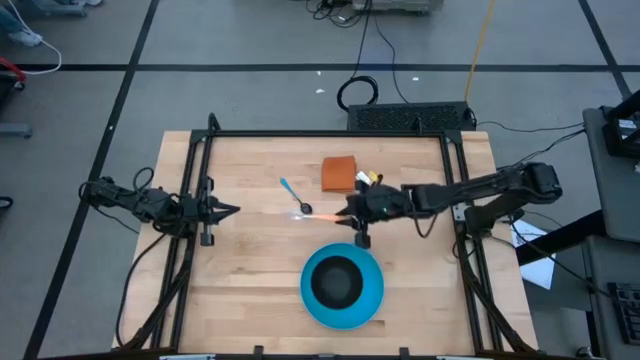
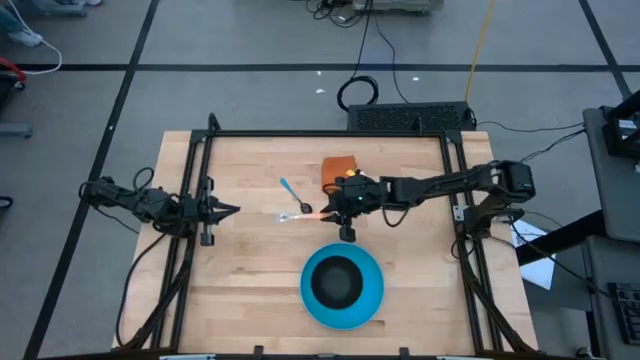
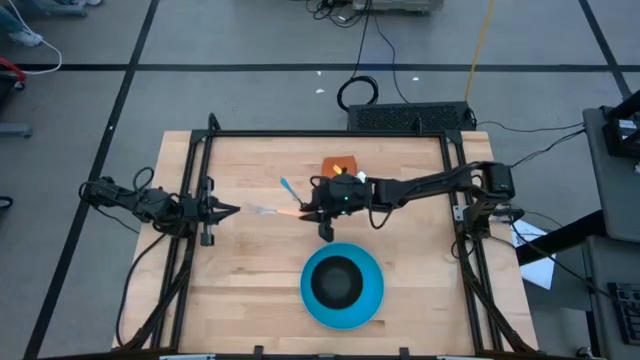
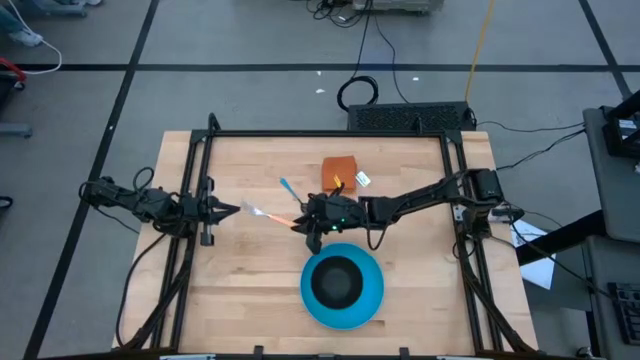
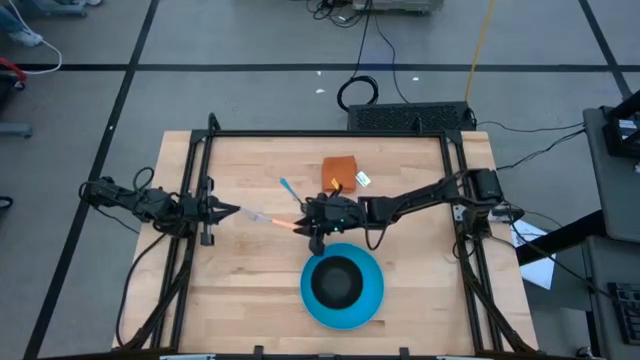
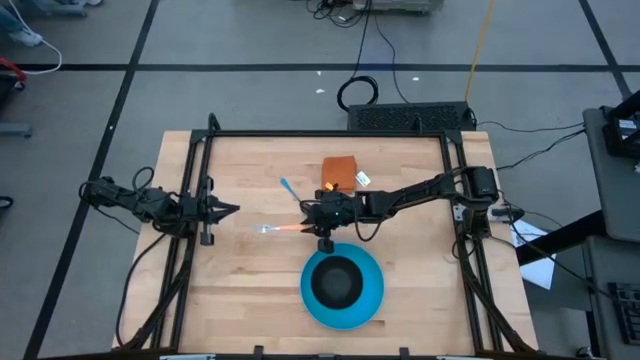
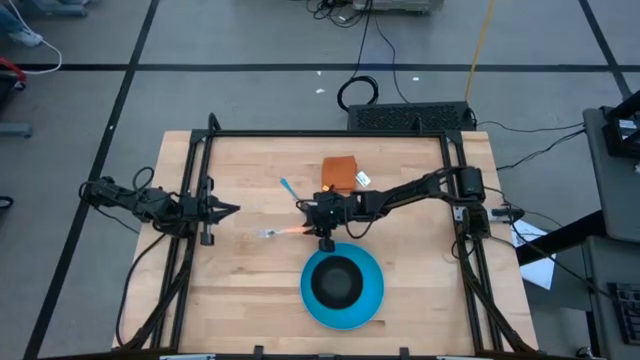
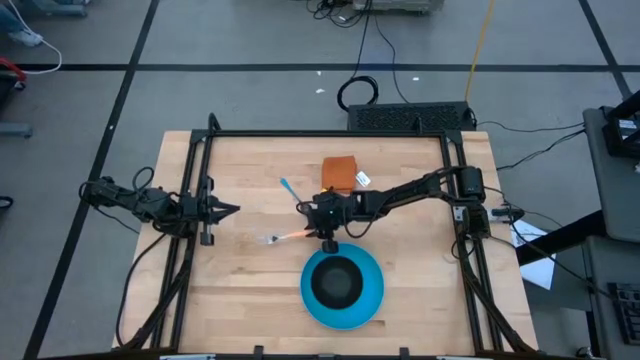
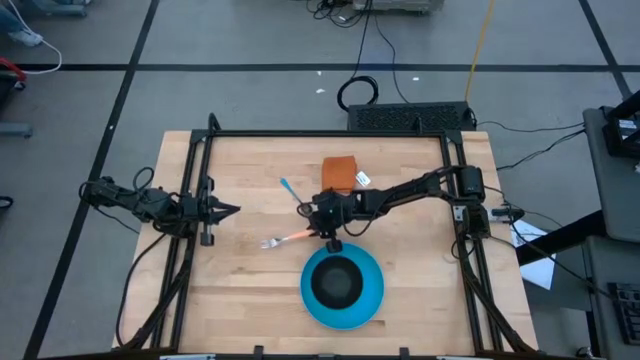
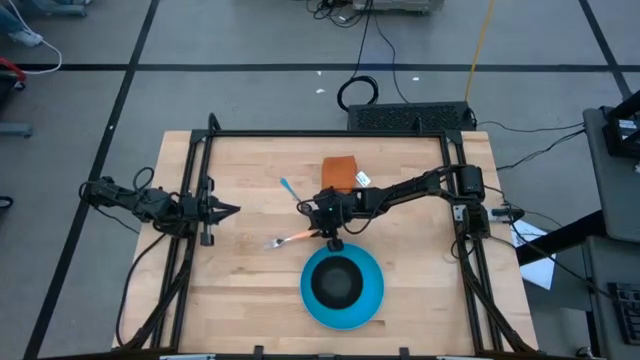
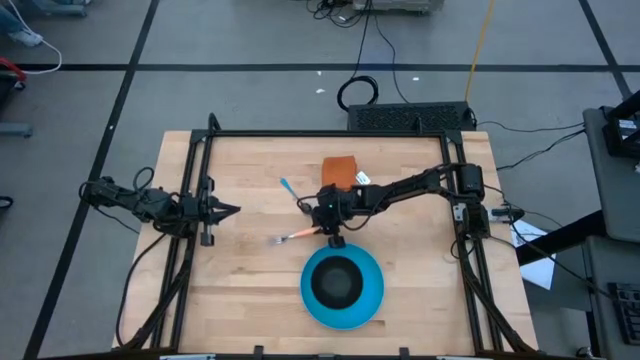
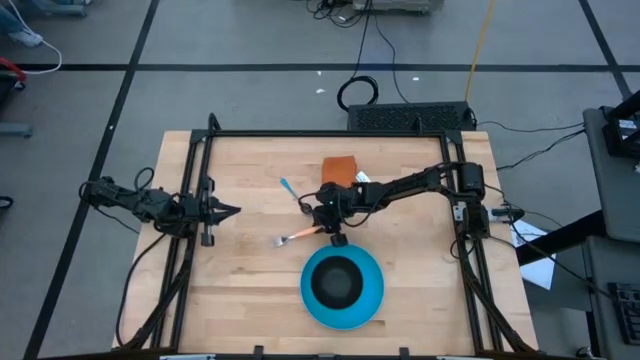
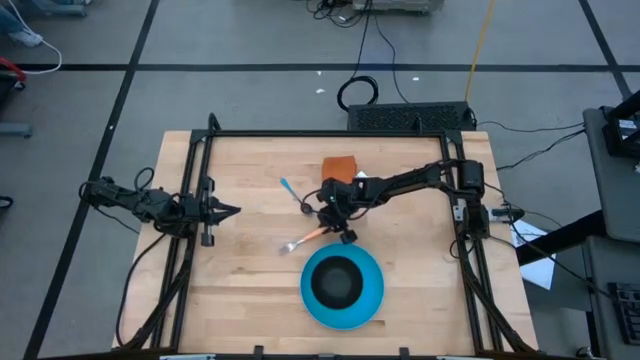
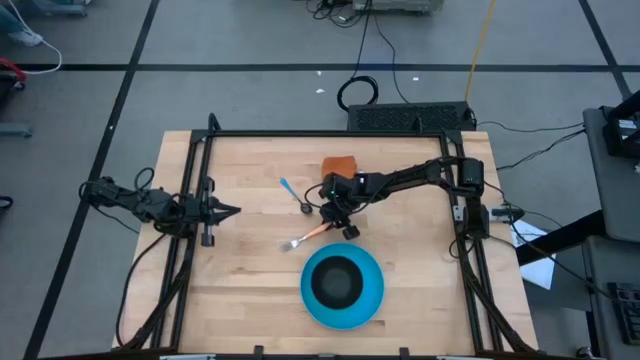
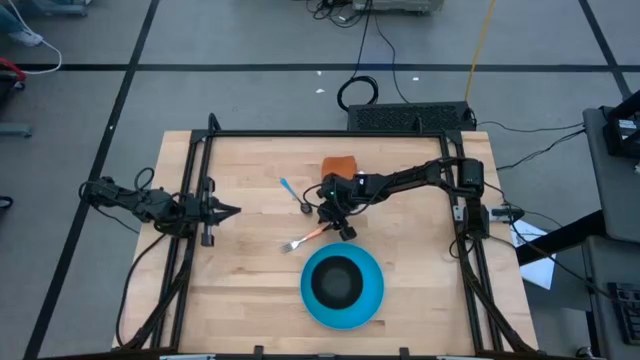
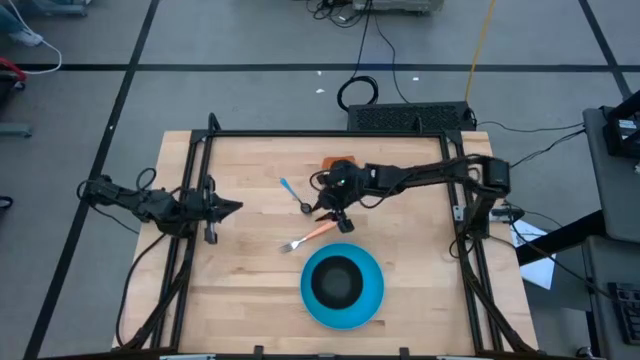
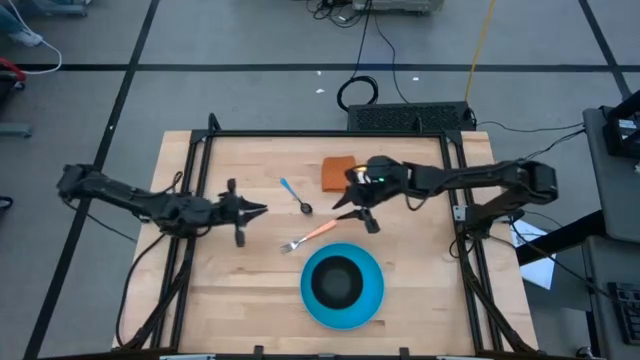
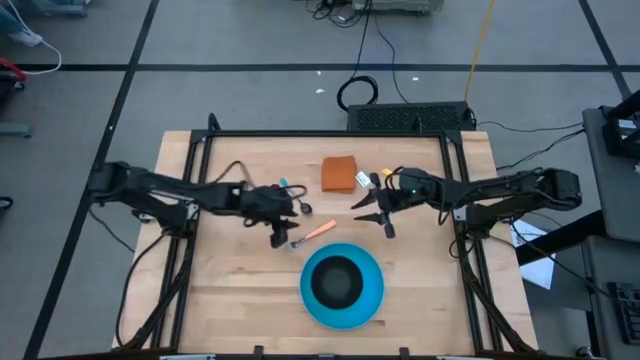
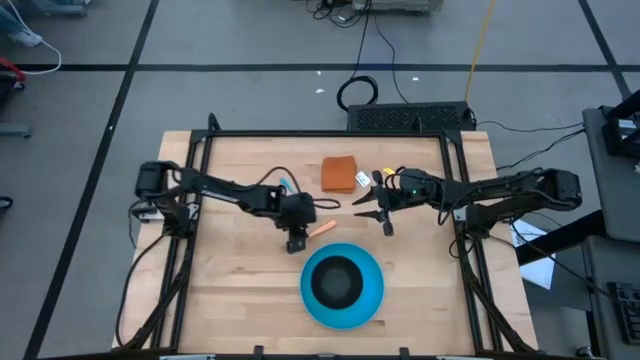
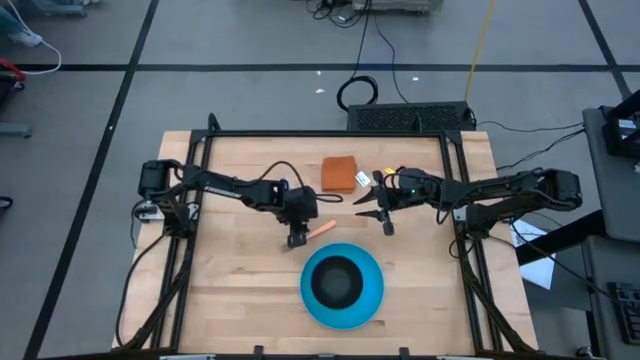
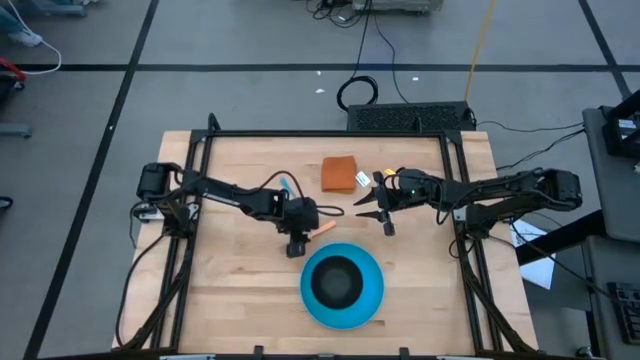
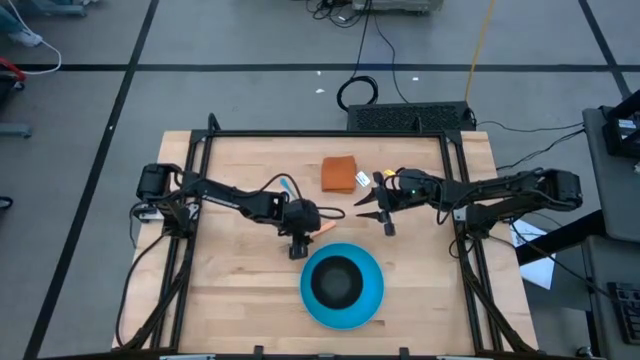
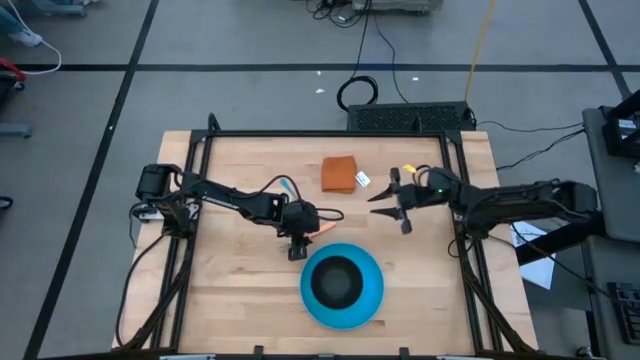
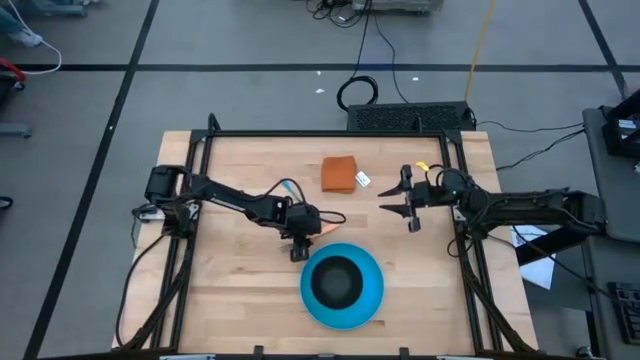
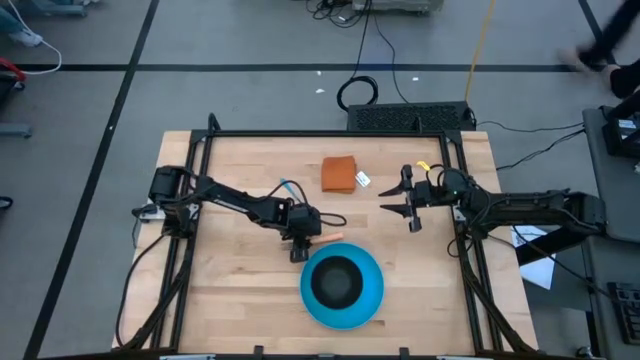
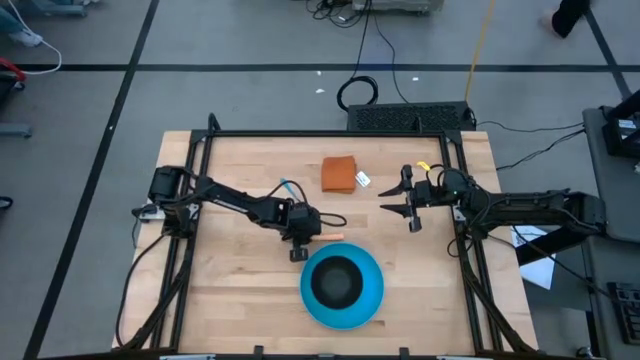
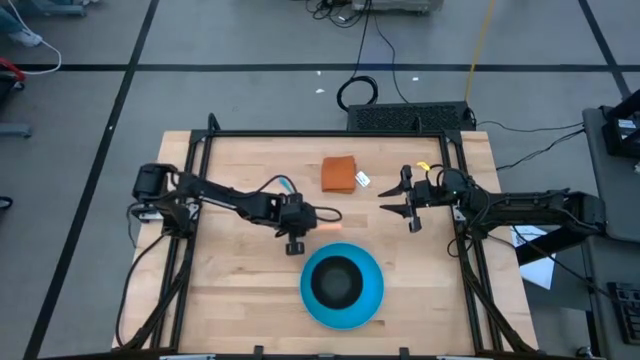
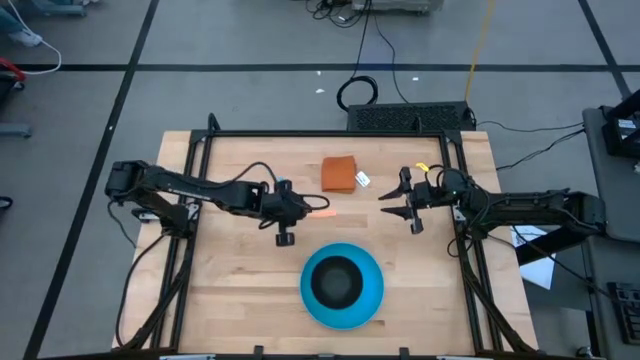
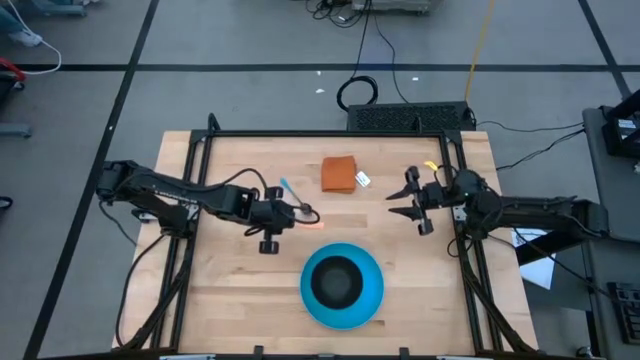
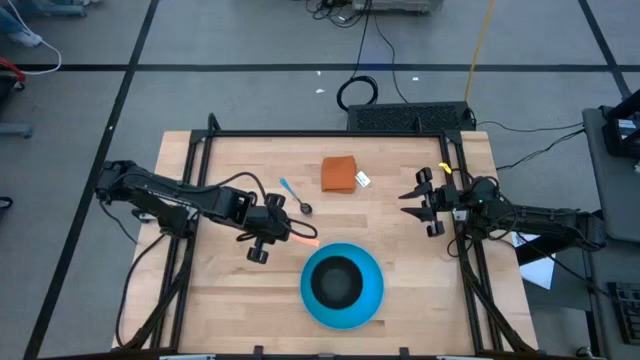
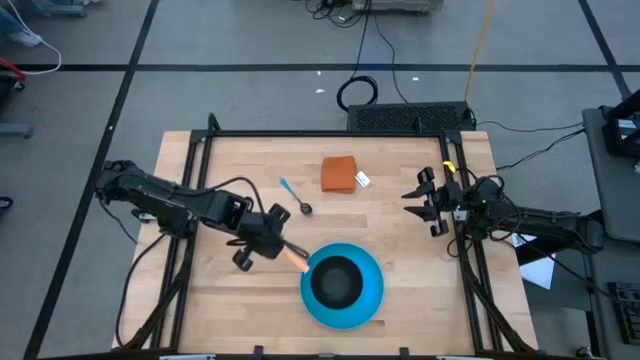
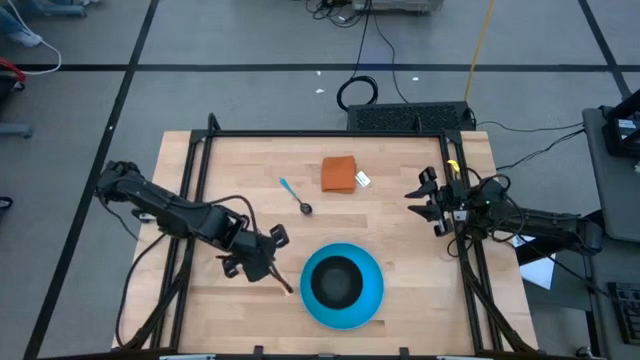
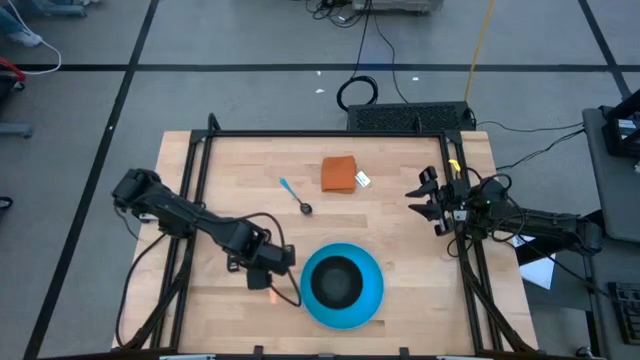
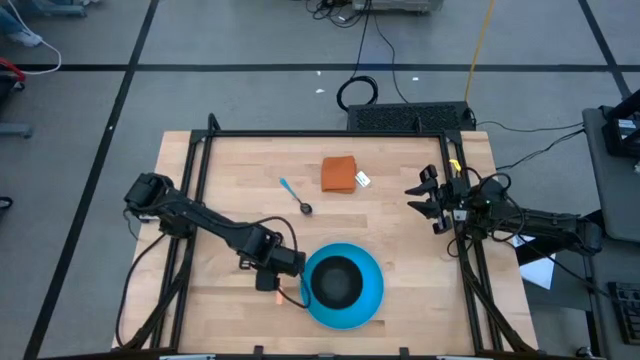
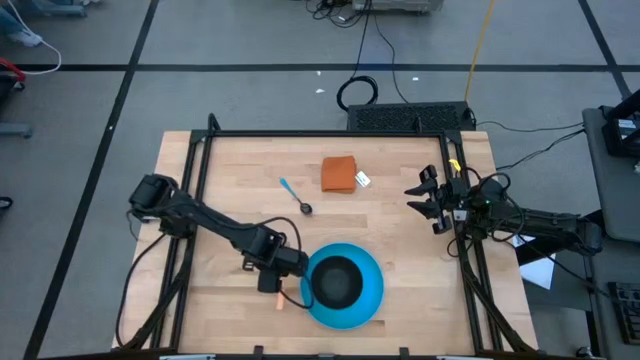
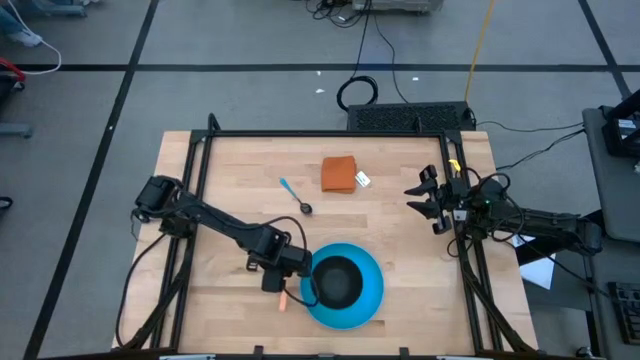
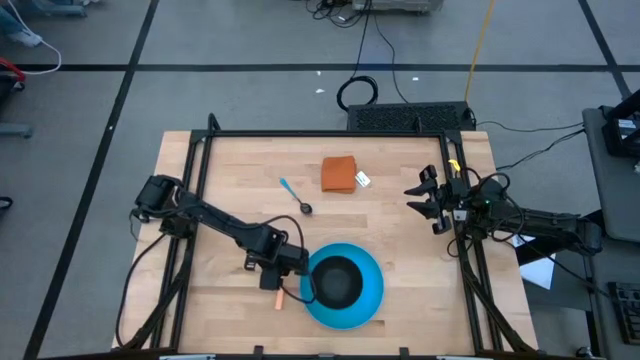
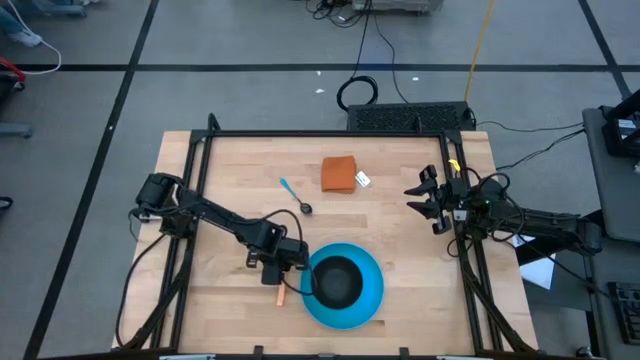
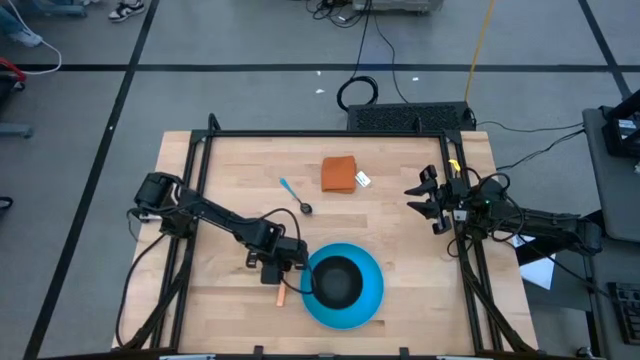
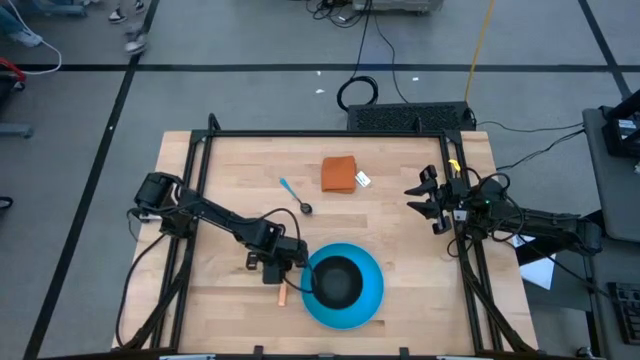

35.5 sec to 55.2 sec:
Task: Set table place
Put the orange fork on the left side of the blue plate
